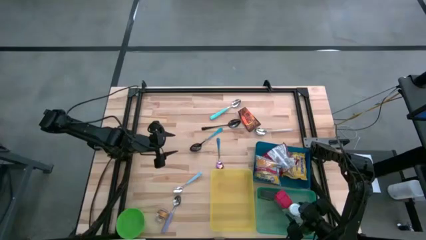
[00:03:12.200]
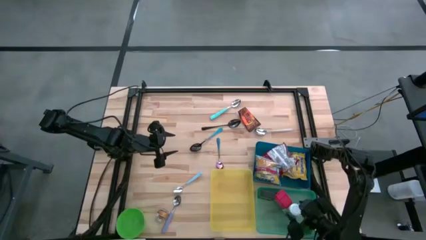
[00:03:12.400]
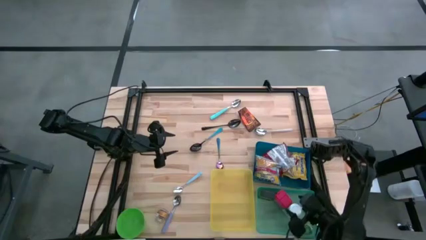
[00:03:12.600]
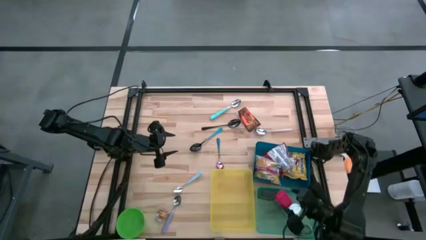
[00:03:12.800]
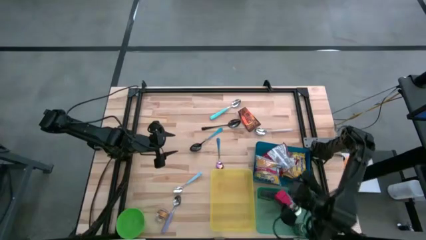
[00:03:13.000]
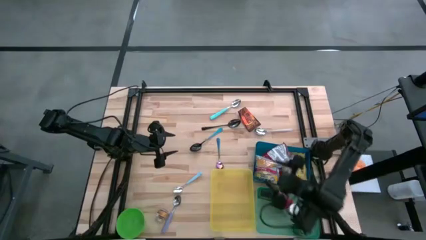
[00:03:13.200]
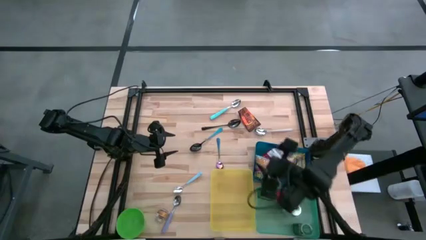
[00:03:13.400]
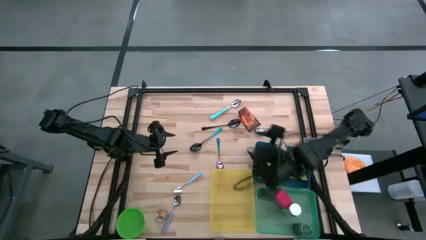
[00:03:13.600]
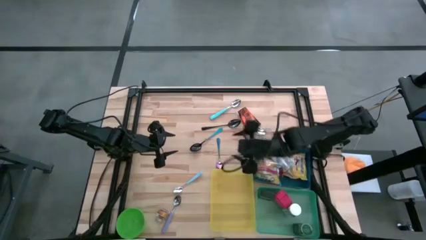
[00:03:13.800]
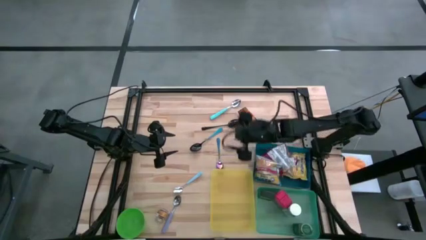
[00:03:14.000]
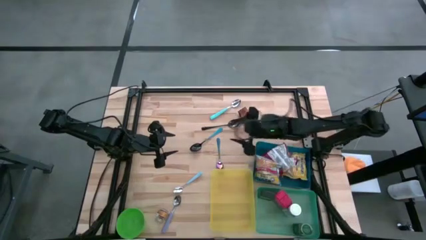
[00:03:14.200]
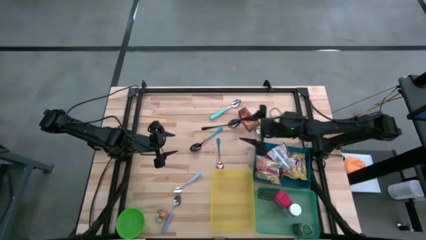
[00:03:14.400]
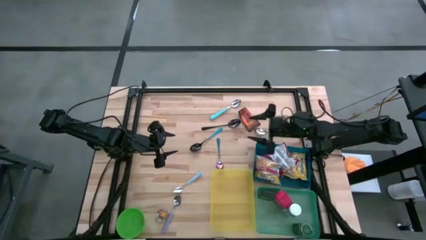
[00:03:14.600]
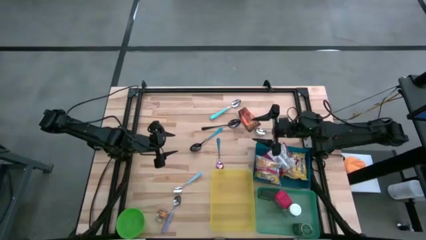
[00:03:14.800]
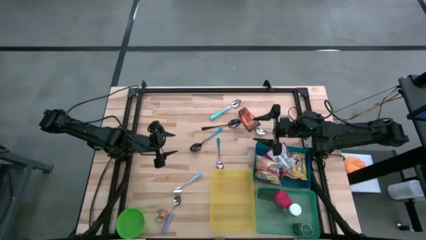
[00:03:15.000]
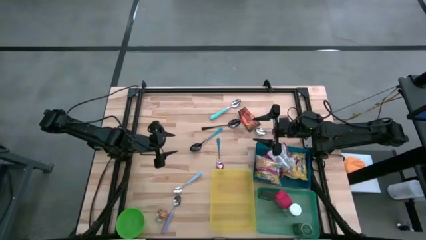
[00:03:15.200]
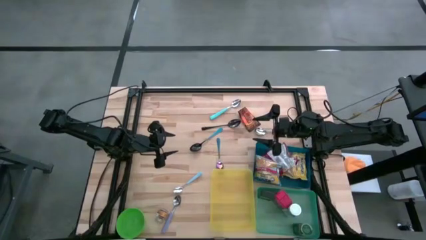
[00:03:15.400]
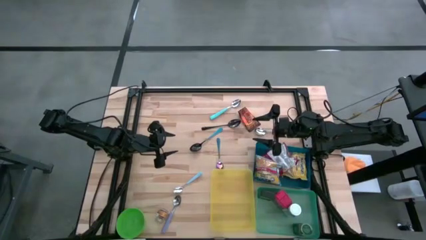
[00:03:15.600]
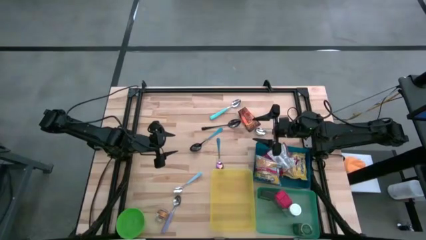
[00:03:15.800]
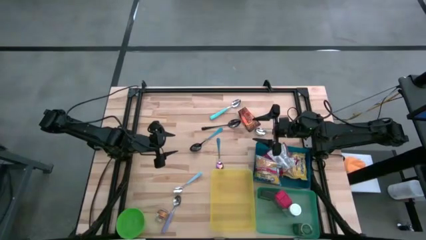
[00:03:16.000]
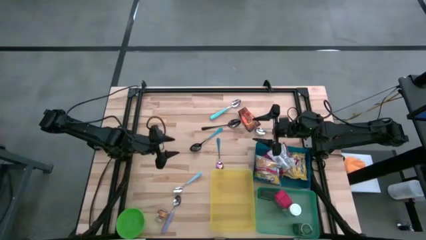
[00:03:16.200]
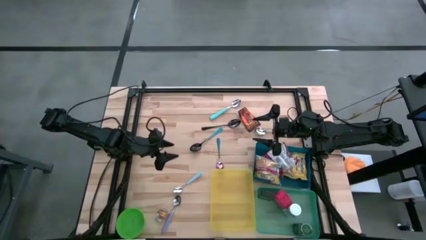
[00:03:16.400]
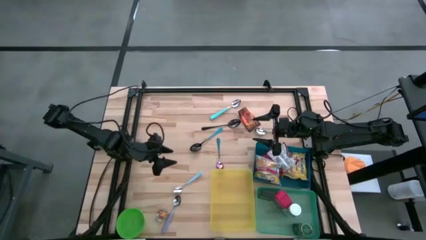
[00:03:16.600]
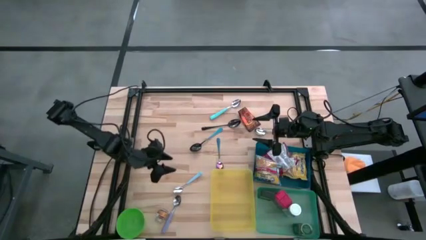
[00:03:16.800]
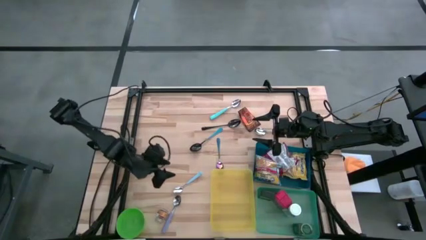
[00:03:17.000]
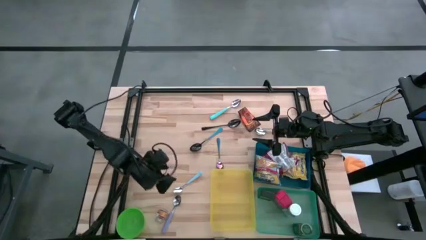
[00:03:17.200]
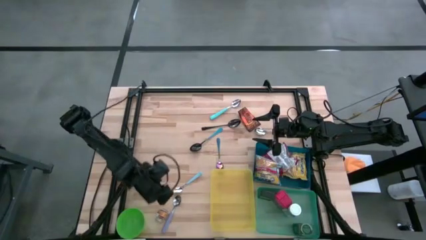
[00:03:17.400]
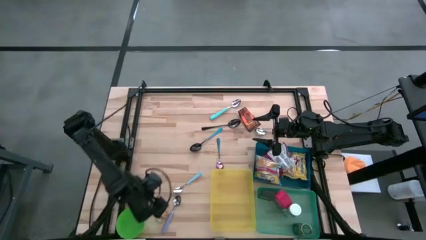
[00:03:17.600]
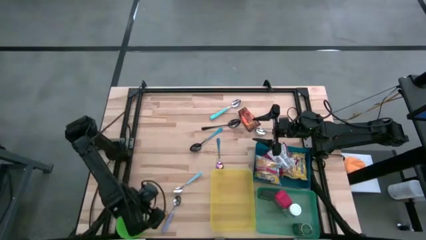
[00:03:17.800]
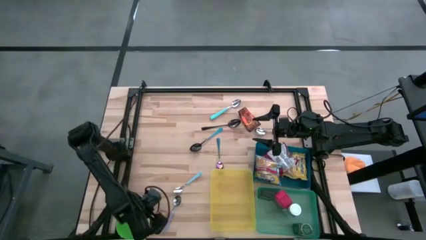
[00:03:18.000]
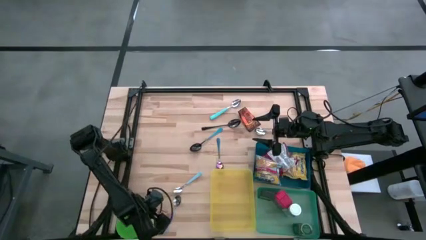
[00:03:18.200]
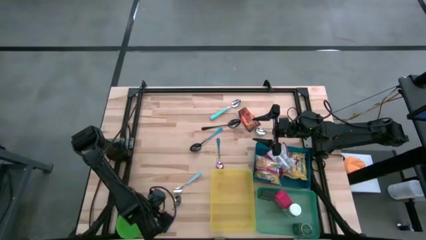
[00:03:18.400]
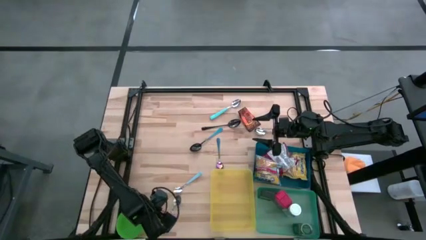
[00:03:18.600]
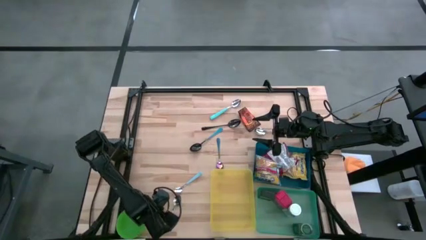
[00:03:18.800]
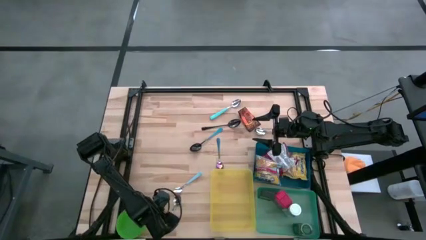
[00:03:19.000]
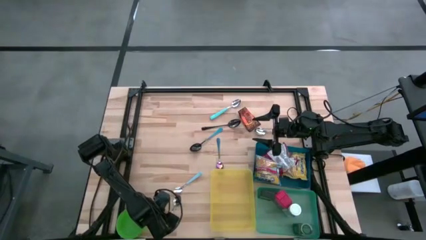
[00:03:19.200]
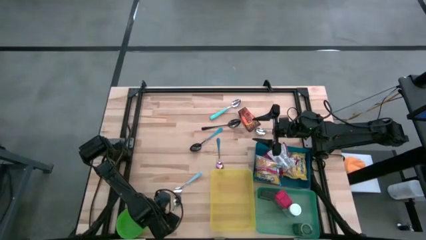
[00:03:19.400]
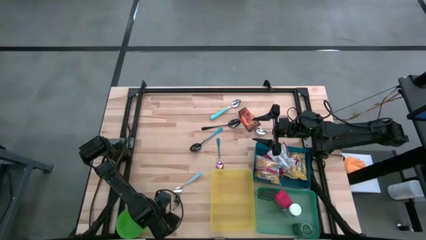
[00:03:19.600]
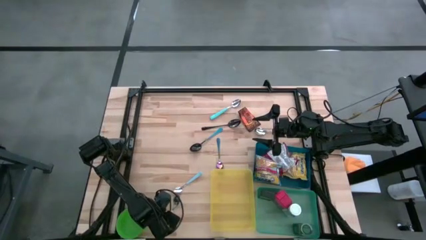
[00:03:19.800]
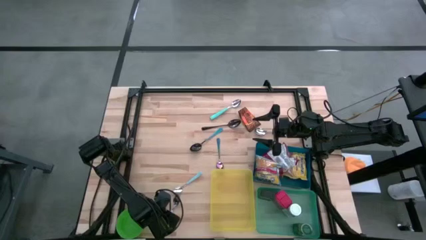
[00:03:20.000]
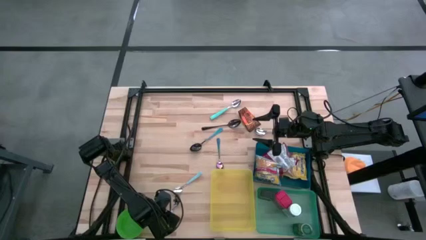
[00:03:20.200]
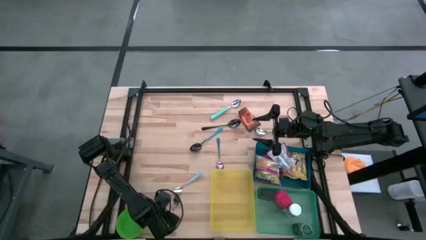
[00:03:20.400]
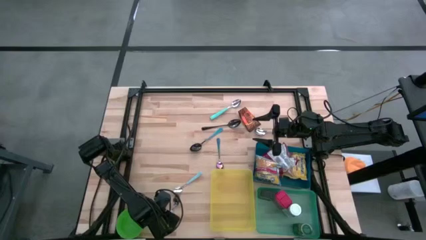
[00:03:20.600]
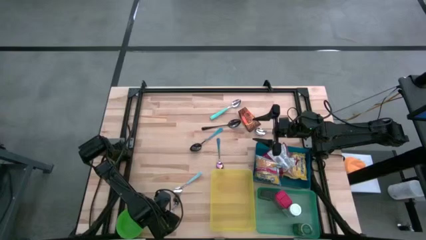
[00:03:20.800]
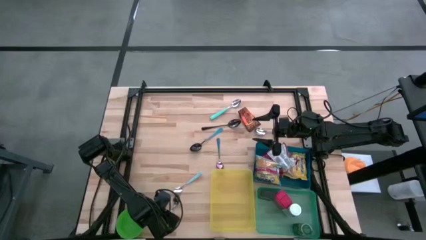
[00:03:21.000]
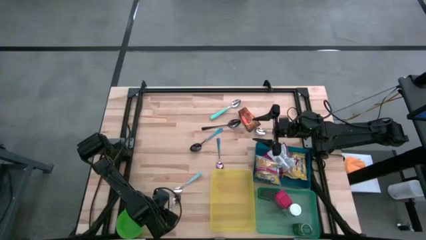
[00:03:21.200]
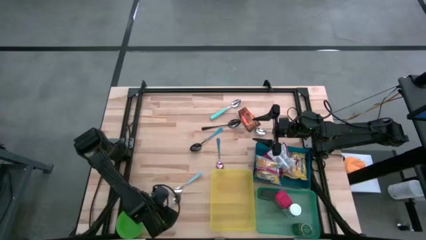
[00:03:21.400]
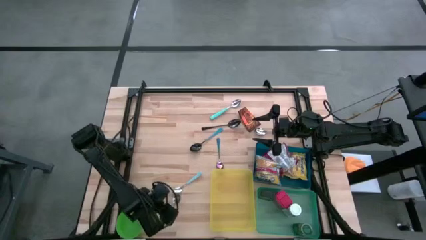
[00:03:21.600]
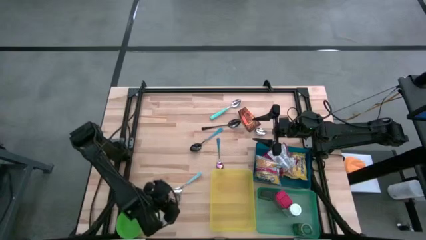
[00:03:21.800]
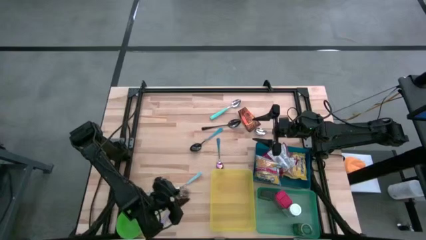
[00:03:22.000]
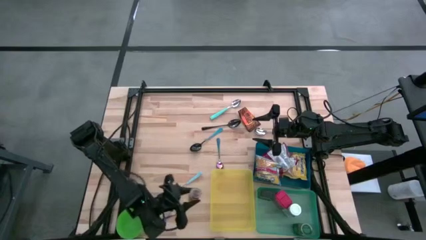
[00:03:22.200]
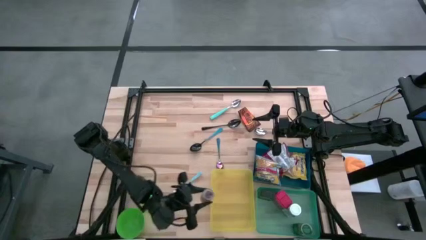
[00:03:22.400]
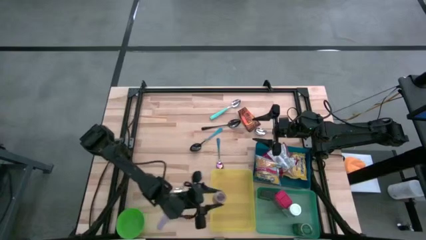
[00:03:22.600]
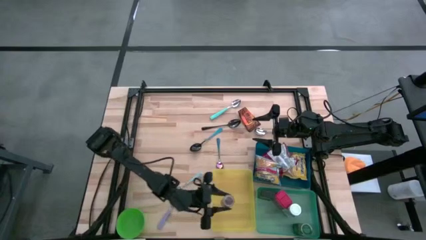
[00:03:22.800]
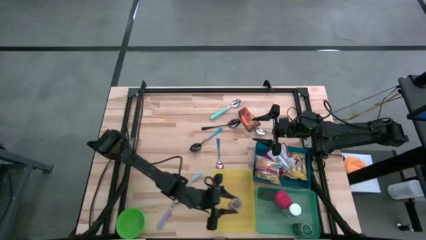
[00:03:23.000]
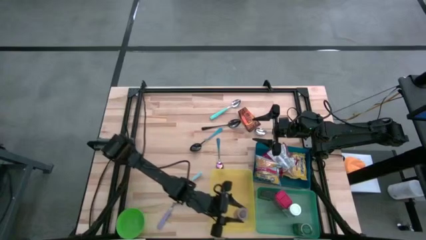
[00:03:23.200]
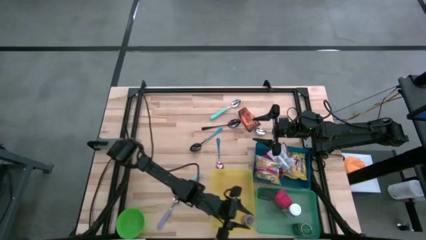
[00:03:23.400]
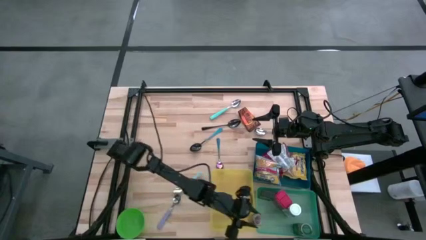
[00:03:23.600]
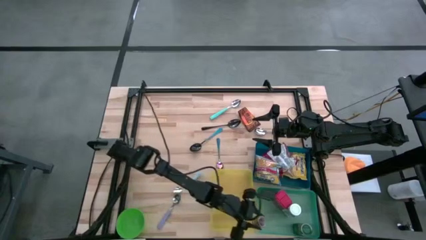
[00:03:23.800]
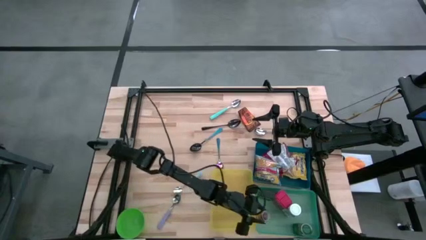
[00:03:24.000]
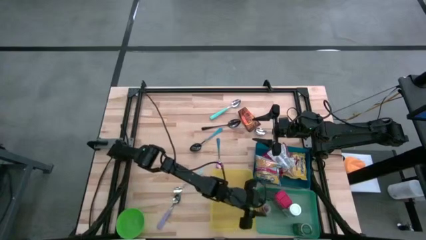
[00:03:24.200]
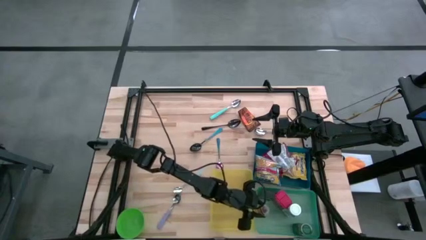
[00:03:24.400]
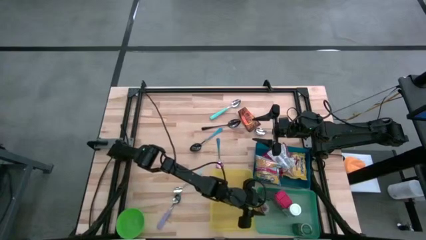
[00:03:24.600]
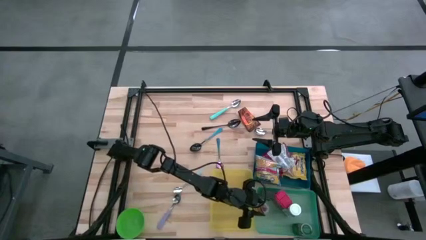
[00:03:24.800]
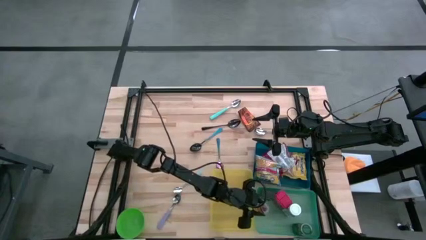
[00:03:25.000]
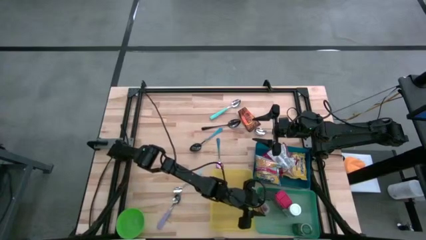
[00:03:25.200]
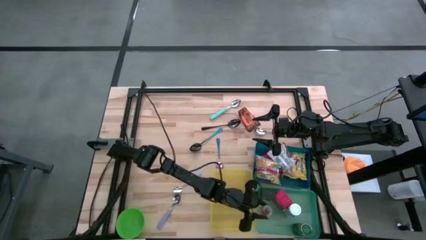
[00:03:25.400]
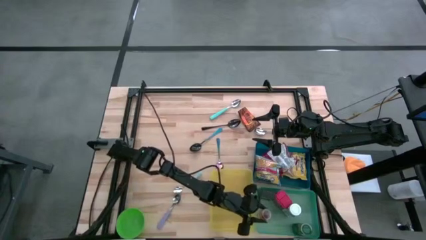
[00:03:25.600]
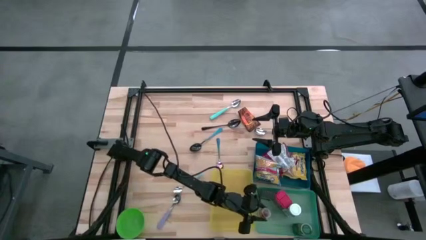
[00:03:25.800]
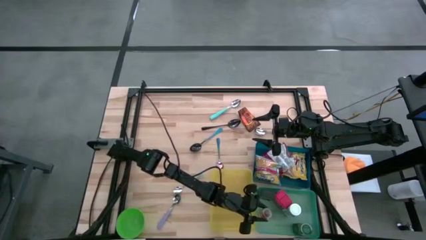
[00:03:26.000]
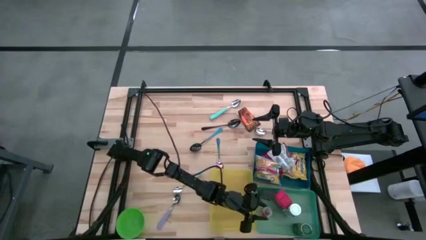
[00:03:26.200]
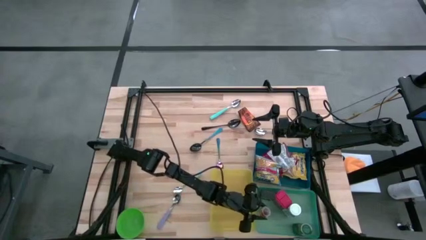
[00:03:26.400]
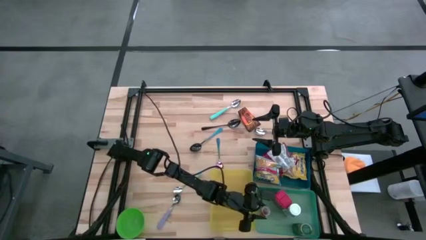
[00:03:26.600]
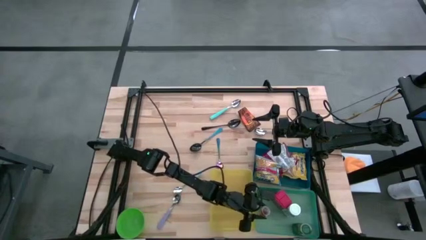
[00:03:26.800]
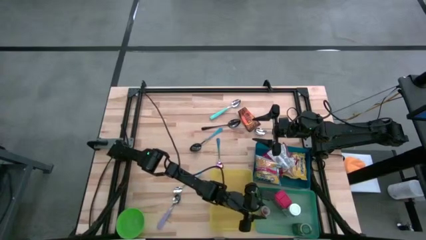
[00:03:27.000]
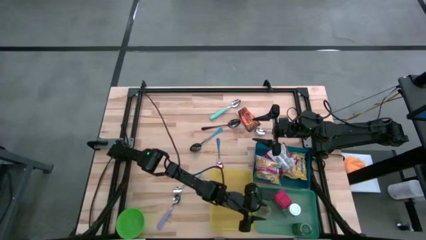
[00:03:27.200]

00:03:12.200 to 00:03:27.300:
Put the brown seasoning bottle into the green bin
